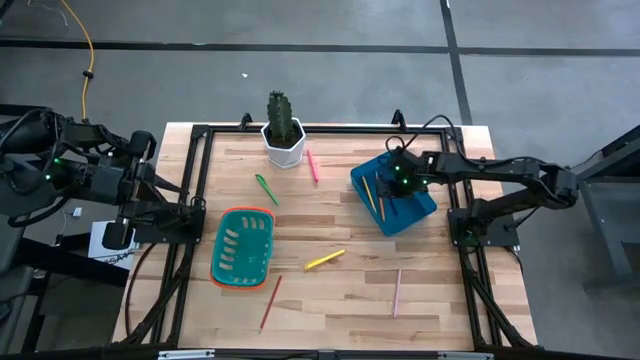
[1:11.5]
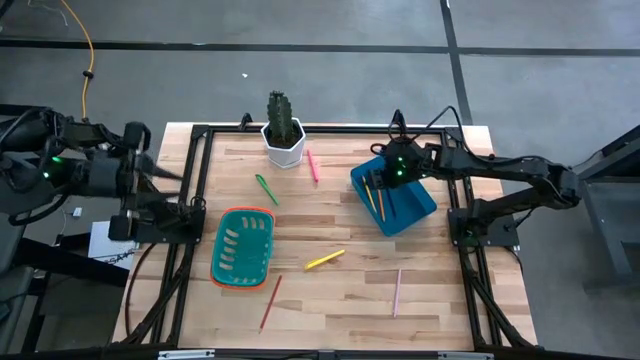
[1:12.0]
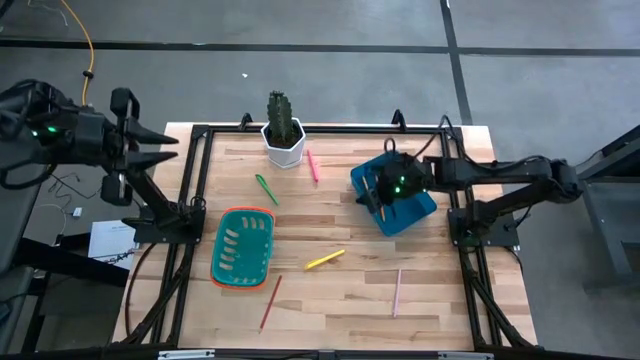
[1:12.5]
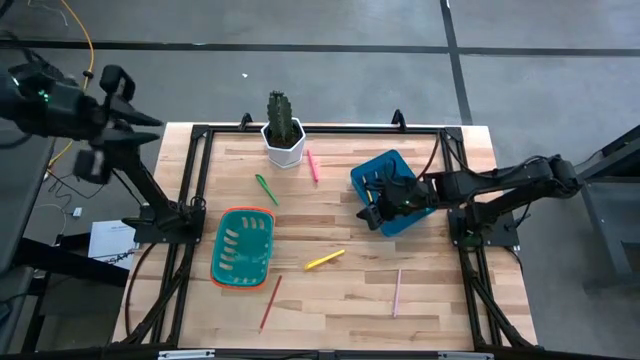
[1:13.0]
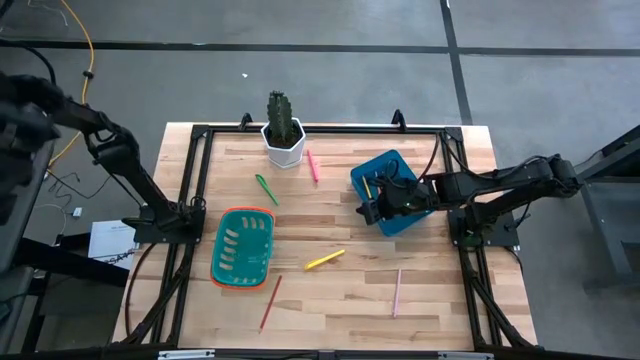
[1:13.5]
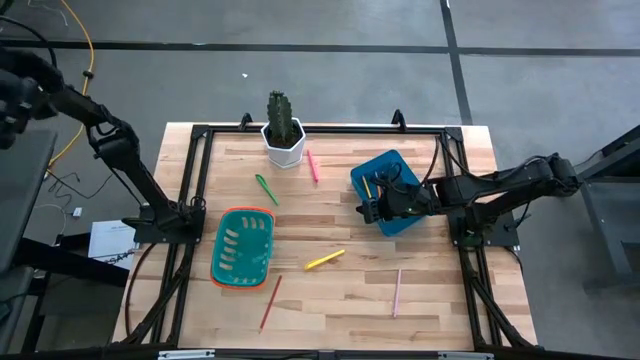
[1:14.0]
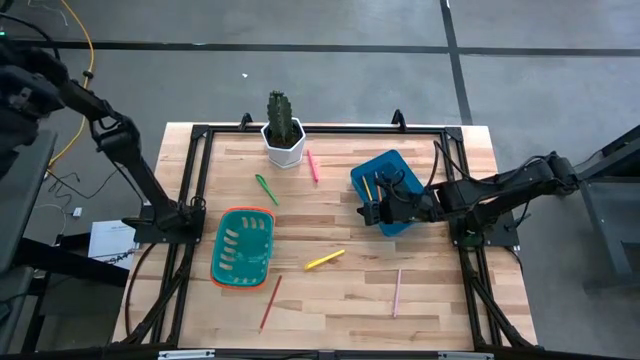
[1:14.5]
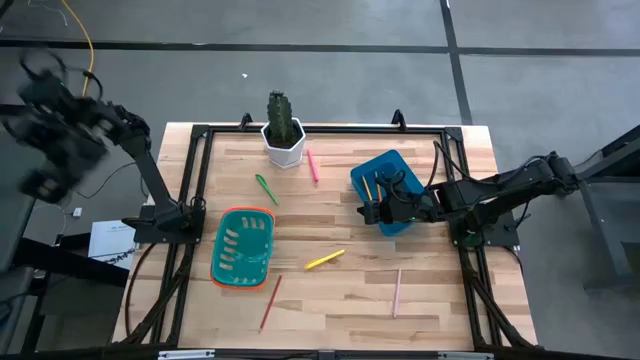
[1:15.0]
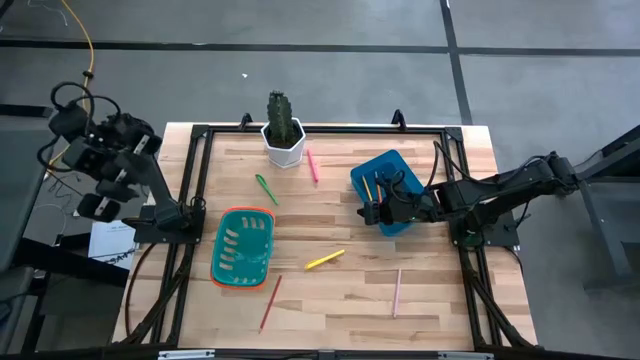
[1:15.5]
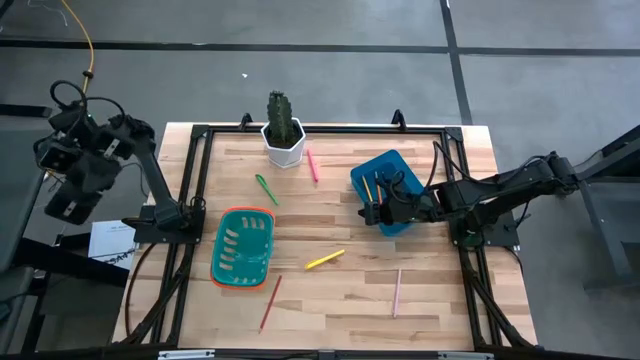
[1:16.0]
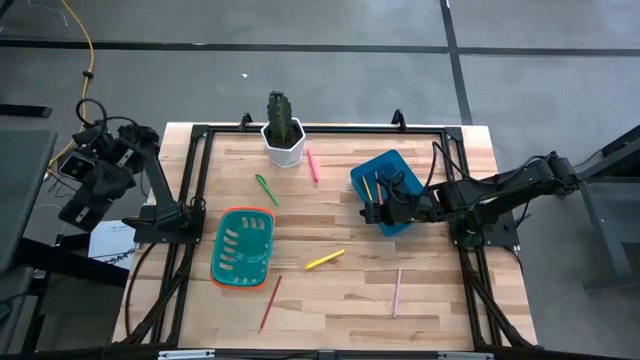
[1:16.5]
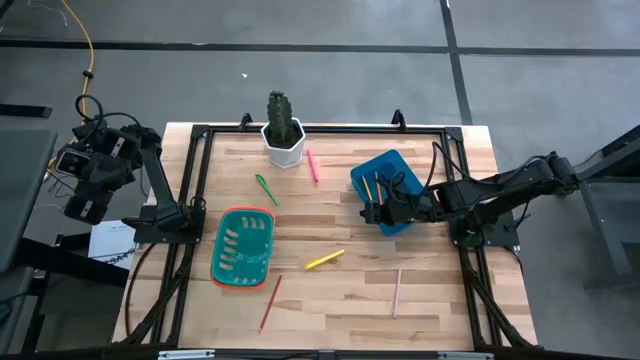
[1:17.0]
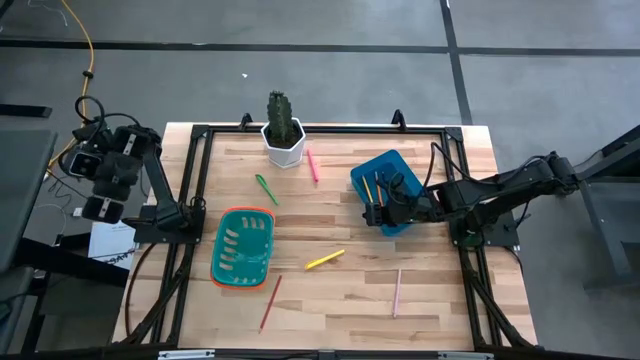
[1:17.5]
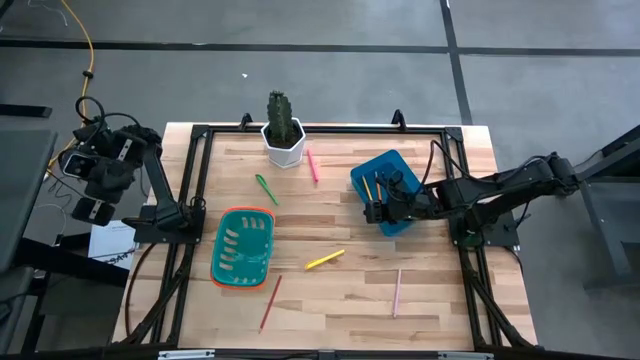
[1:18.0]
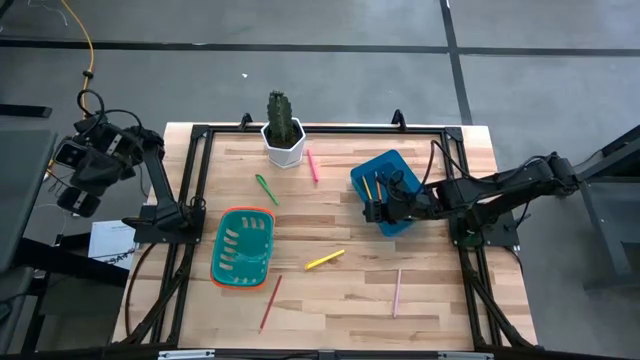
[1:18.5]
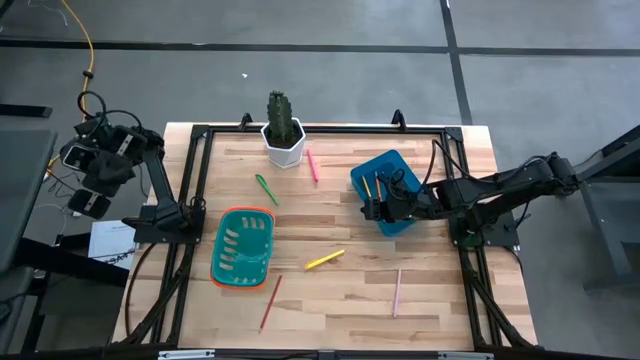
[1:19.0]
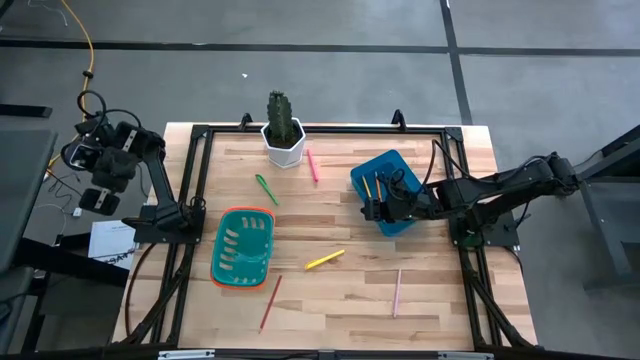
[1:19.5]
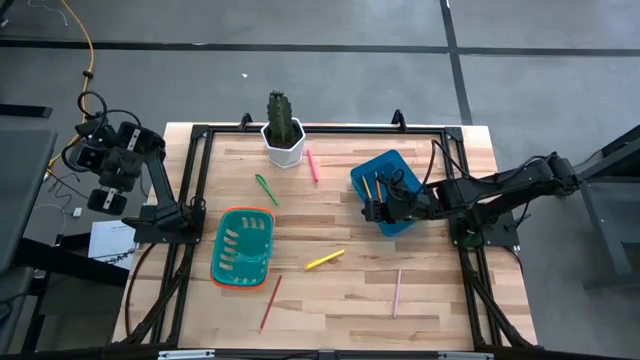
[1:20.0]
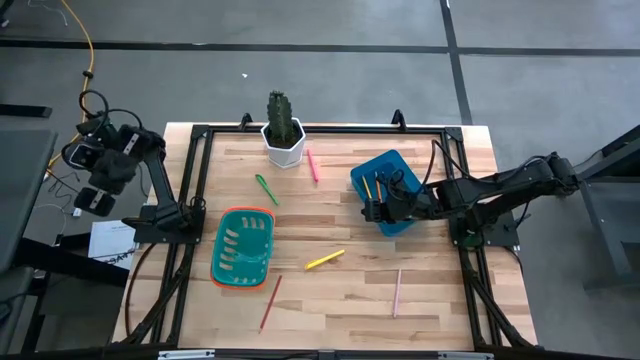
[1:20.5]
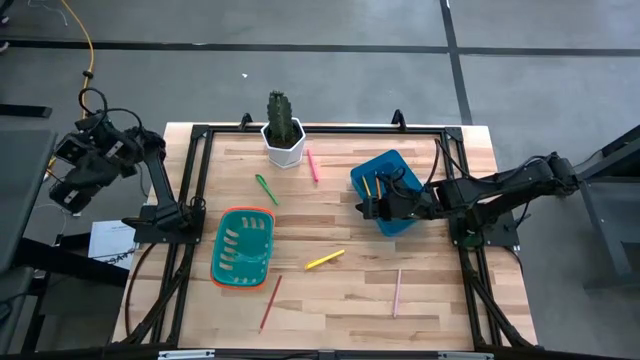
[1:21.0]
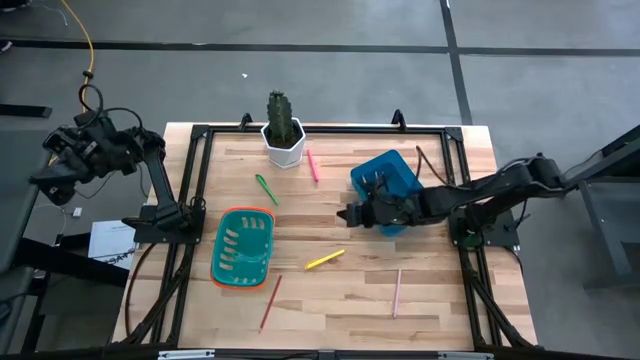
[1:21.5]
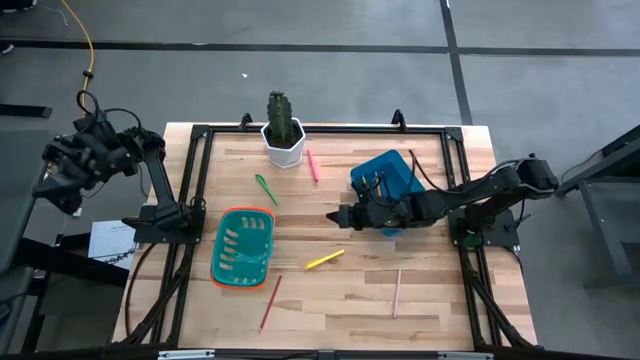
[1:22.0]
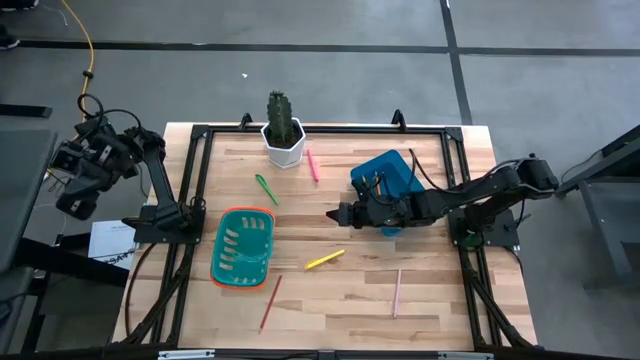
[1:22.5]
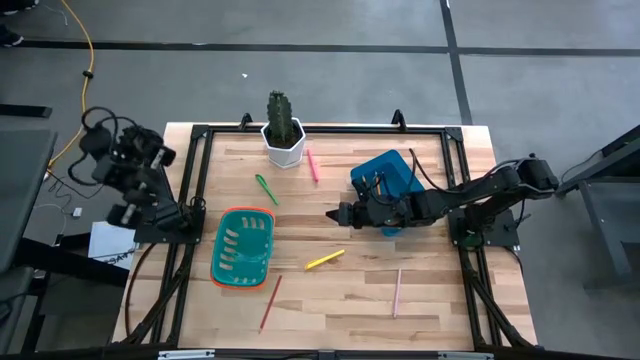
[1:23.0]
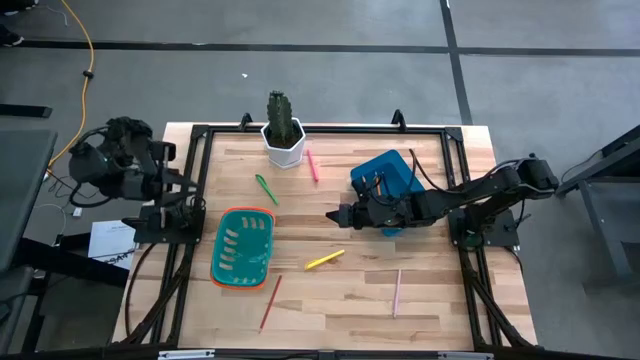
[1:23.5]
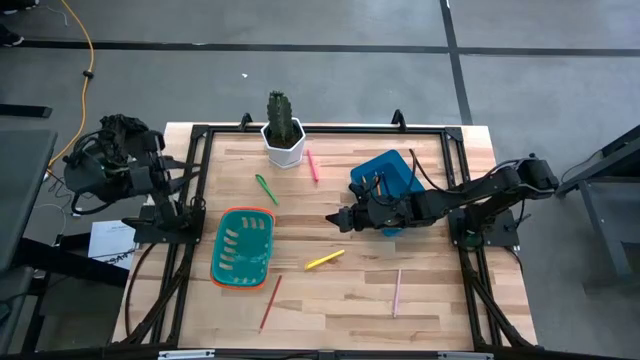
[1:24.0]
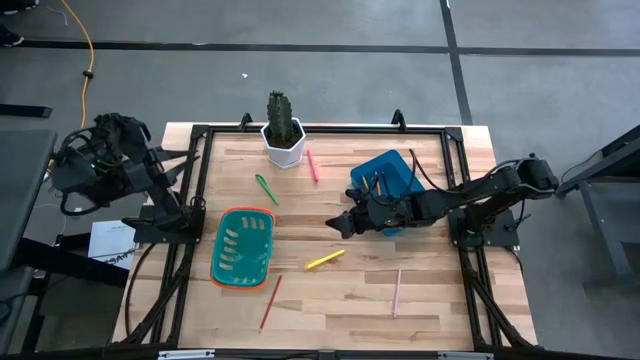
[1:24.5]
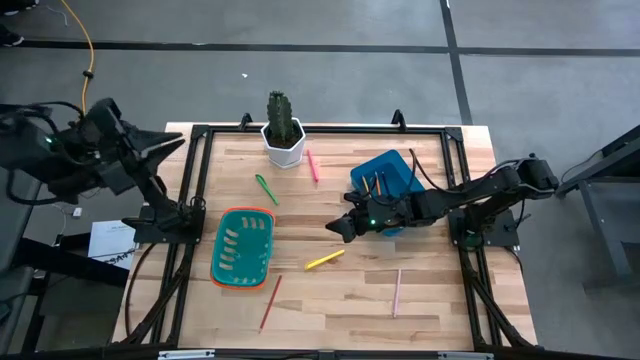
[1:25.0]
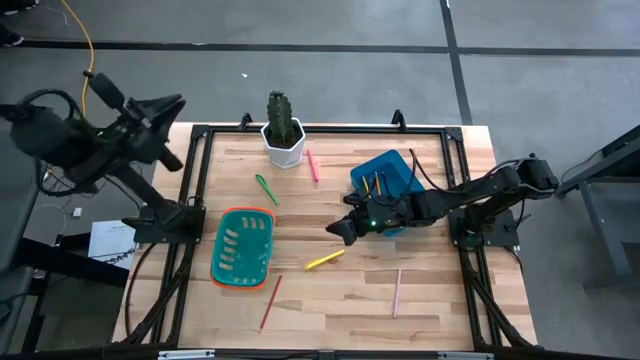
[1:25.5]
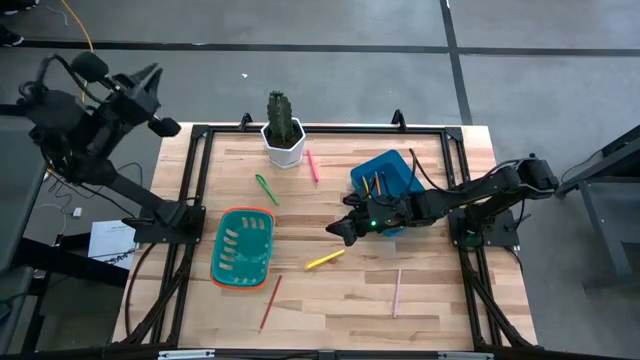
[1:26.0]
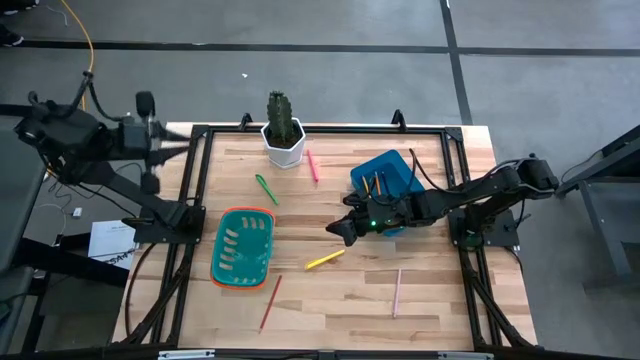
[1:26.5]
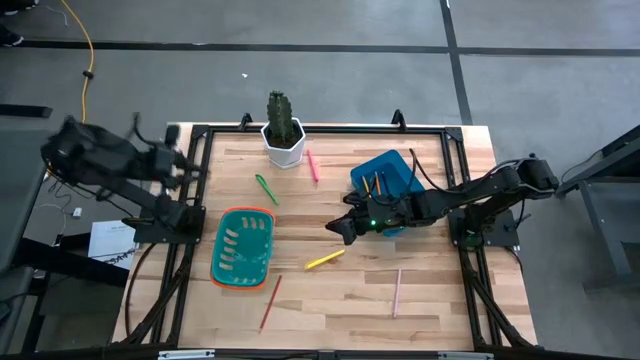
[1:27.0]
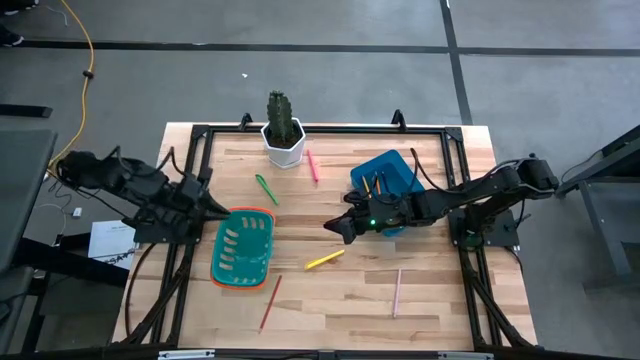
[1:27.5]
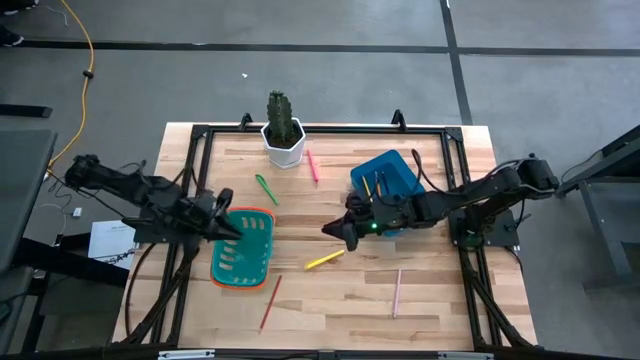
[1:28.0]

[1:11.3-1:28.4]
Task: Sort pens & pencils
Put the yellow pen into the green basket
